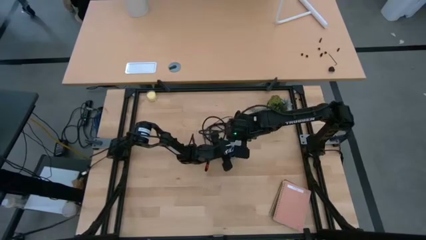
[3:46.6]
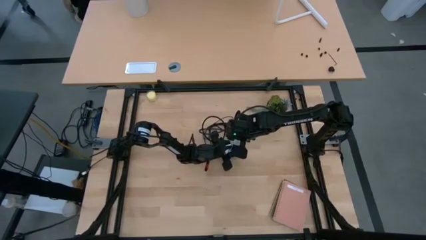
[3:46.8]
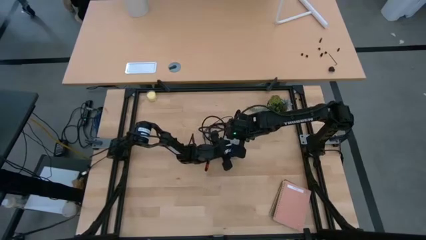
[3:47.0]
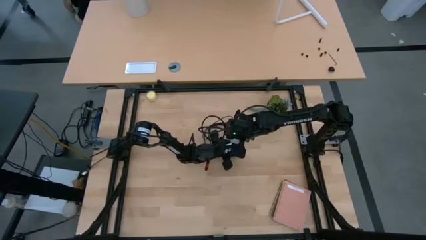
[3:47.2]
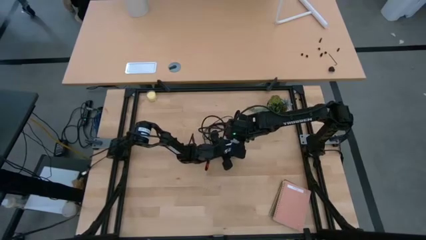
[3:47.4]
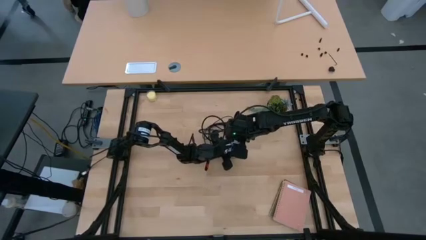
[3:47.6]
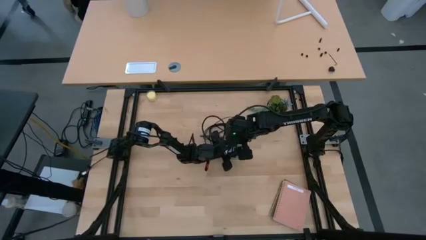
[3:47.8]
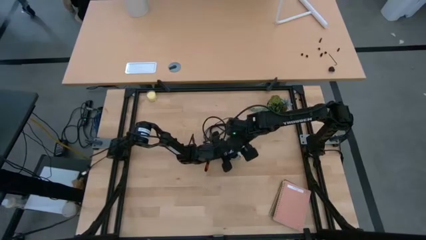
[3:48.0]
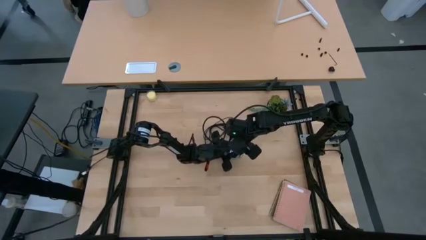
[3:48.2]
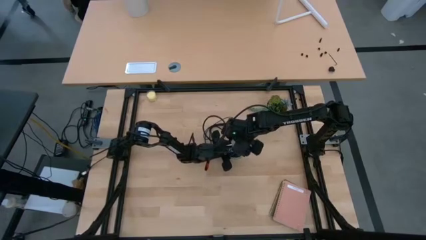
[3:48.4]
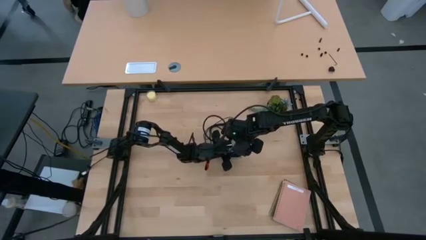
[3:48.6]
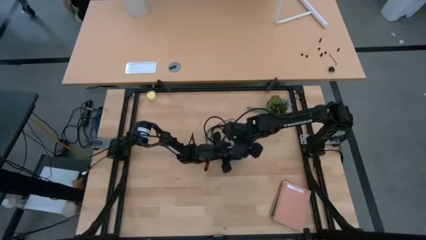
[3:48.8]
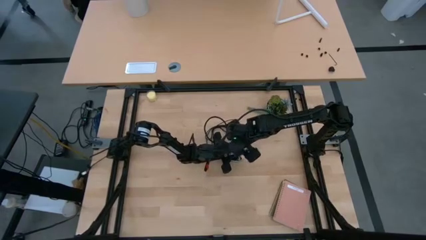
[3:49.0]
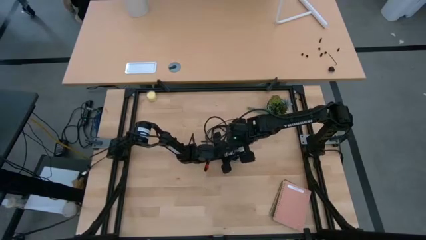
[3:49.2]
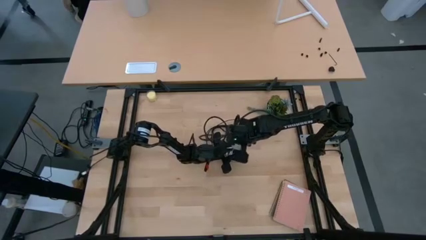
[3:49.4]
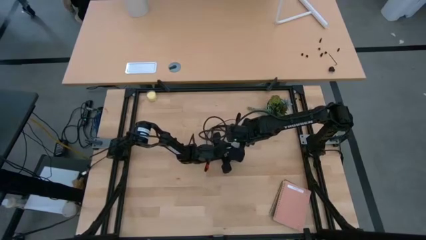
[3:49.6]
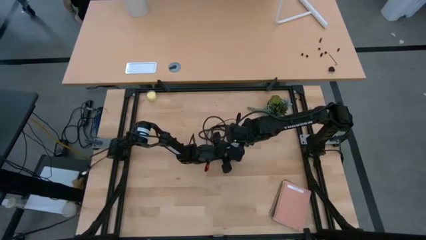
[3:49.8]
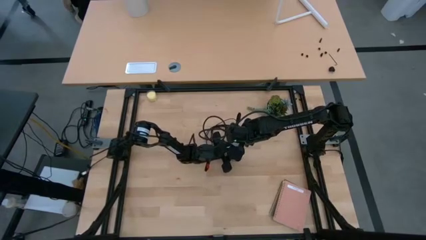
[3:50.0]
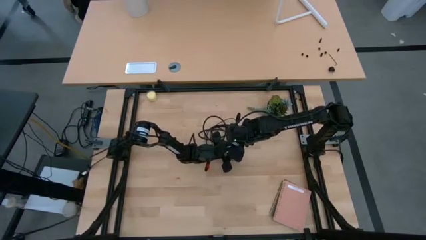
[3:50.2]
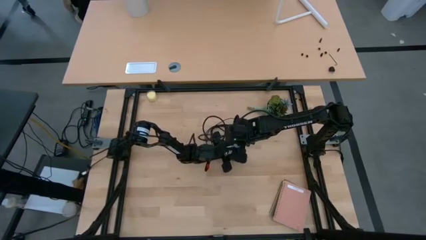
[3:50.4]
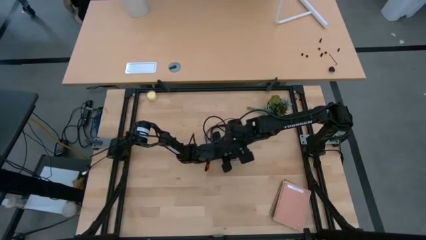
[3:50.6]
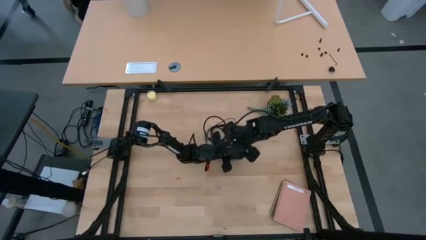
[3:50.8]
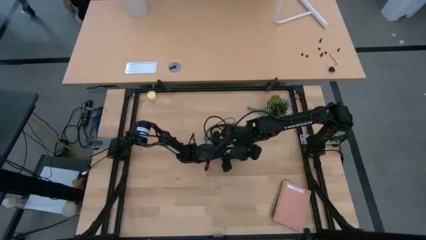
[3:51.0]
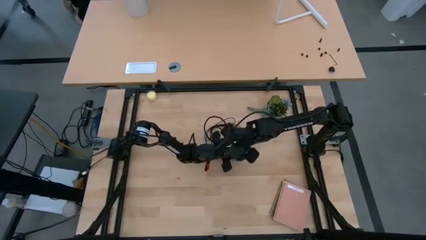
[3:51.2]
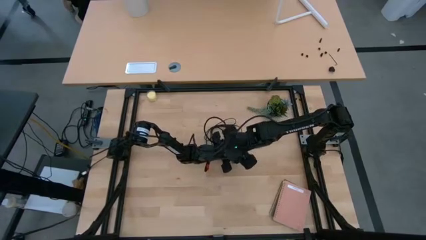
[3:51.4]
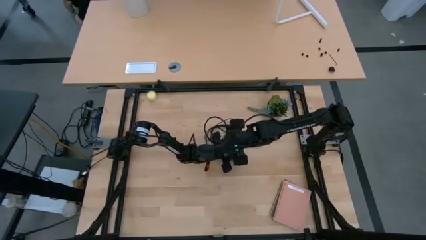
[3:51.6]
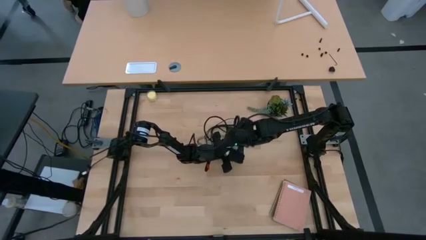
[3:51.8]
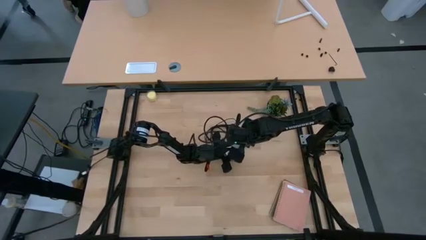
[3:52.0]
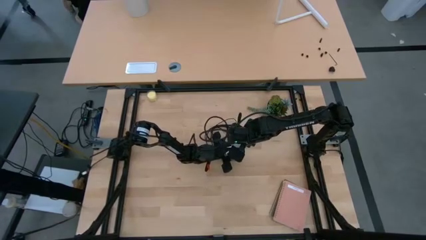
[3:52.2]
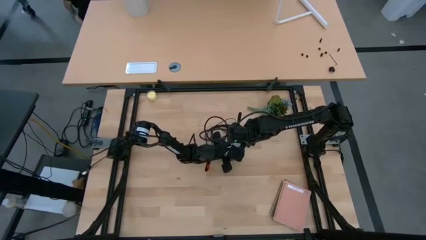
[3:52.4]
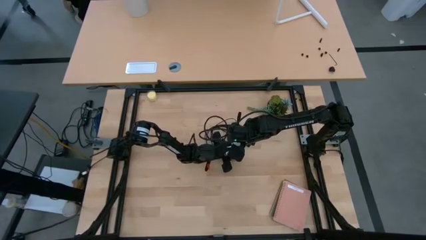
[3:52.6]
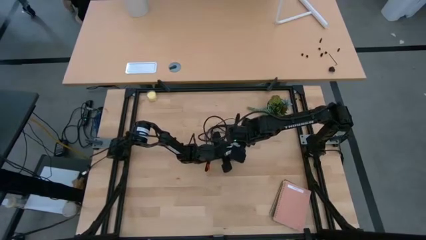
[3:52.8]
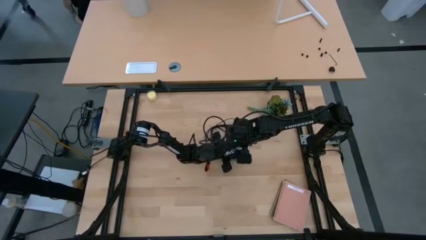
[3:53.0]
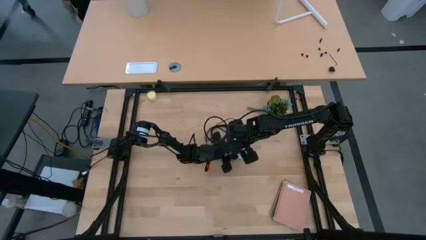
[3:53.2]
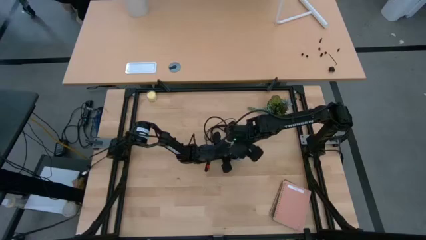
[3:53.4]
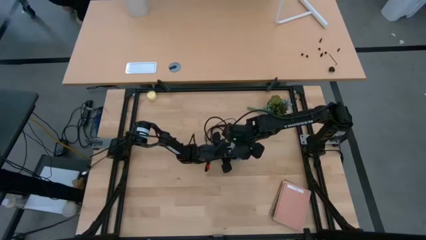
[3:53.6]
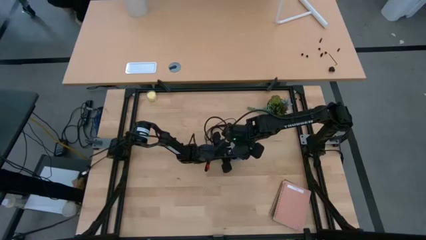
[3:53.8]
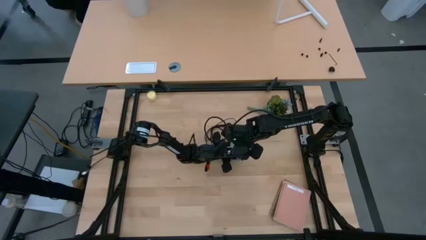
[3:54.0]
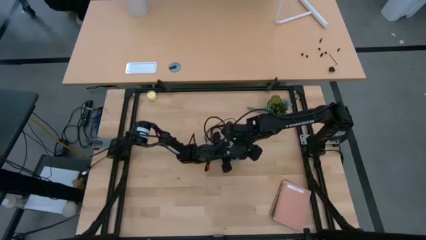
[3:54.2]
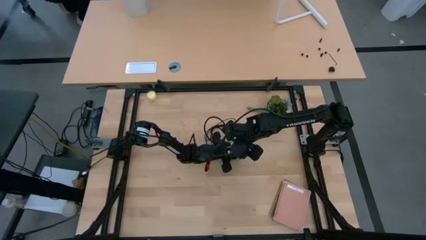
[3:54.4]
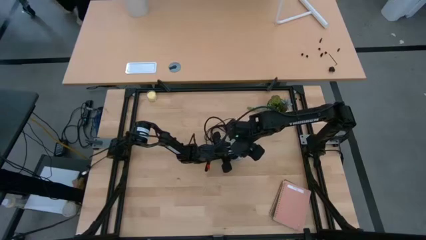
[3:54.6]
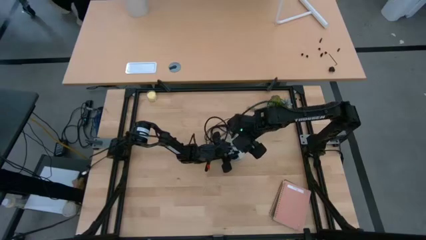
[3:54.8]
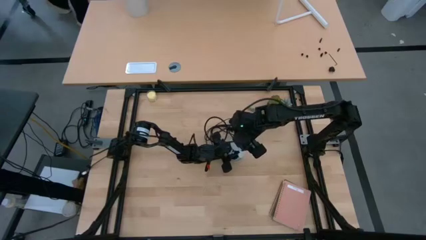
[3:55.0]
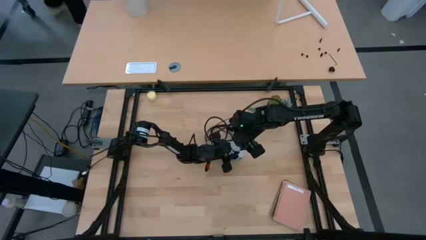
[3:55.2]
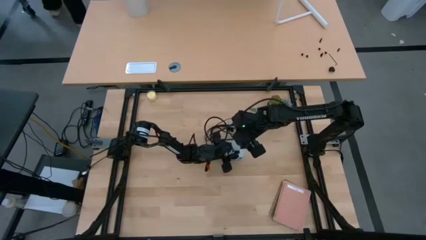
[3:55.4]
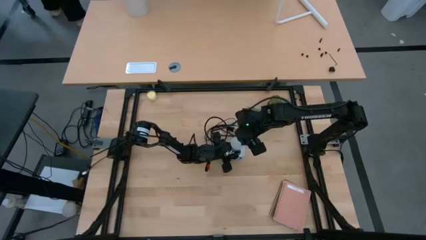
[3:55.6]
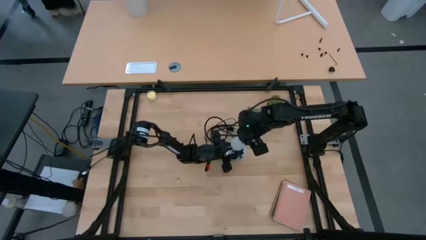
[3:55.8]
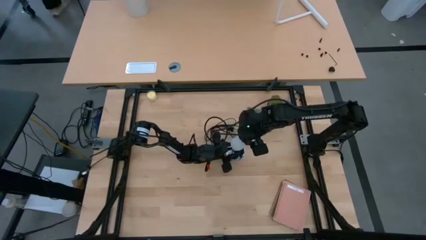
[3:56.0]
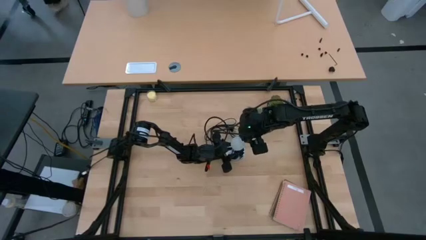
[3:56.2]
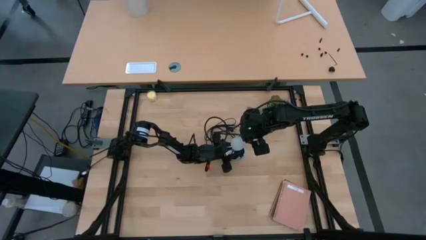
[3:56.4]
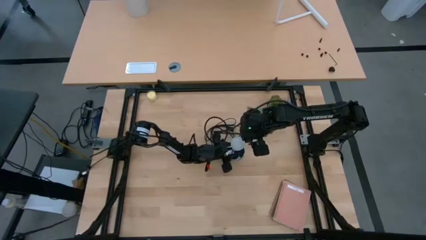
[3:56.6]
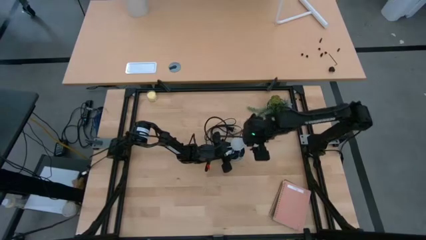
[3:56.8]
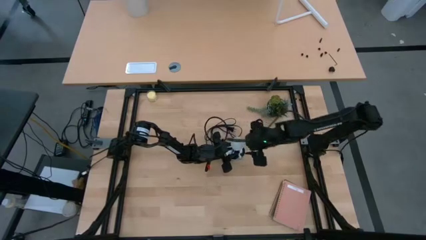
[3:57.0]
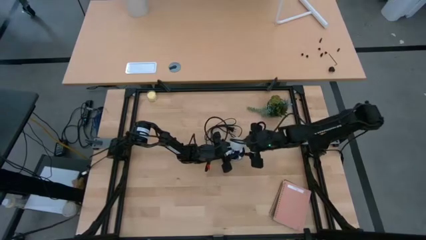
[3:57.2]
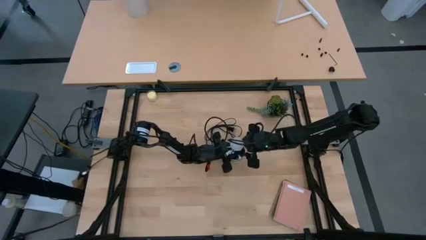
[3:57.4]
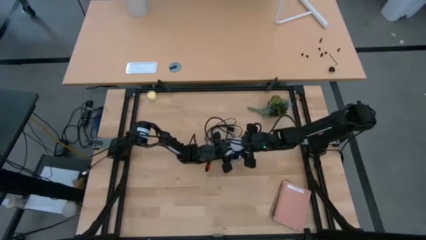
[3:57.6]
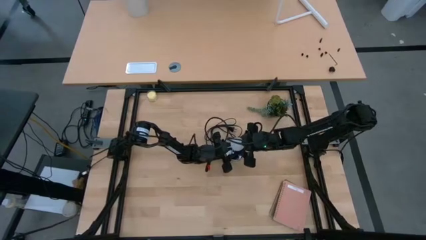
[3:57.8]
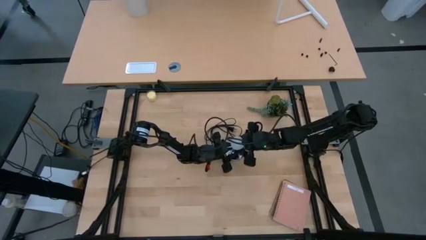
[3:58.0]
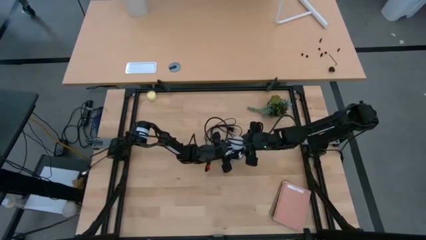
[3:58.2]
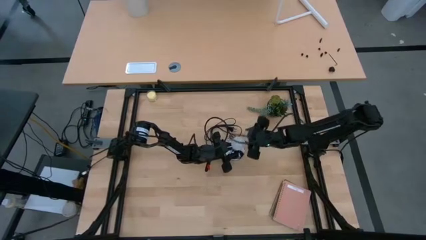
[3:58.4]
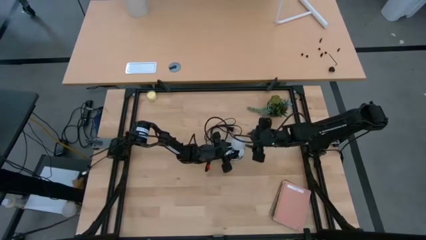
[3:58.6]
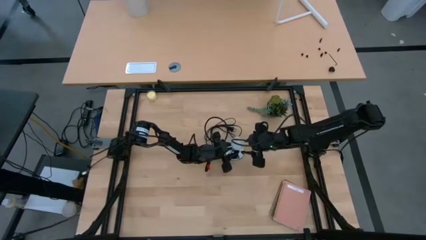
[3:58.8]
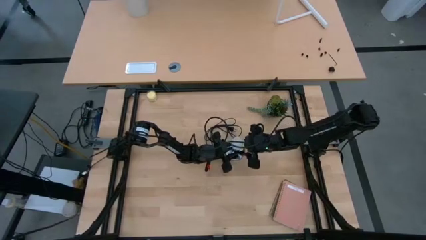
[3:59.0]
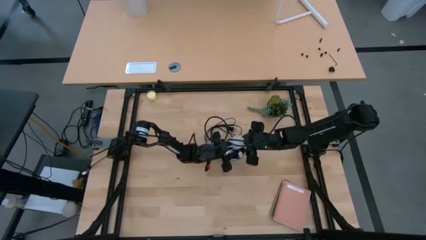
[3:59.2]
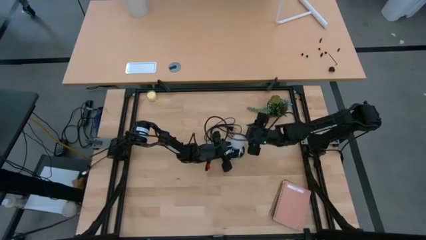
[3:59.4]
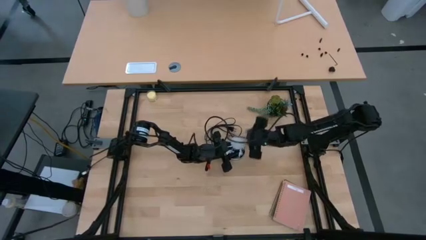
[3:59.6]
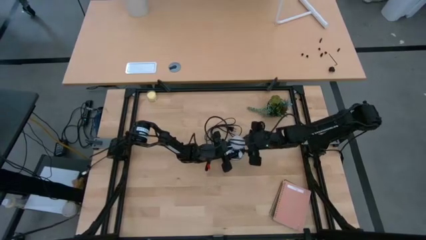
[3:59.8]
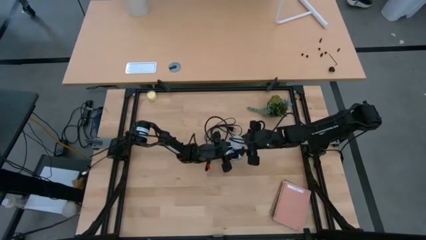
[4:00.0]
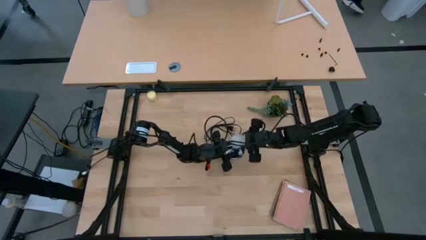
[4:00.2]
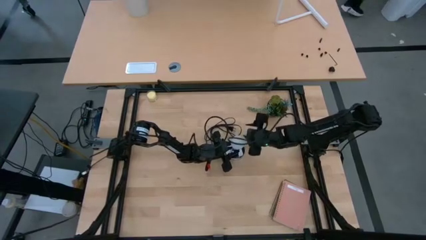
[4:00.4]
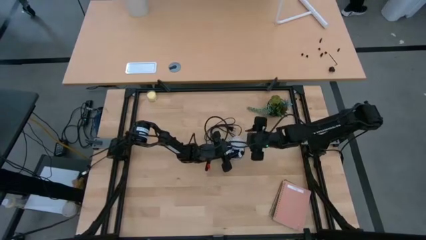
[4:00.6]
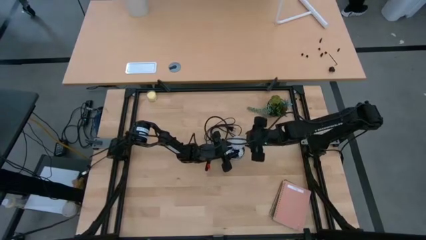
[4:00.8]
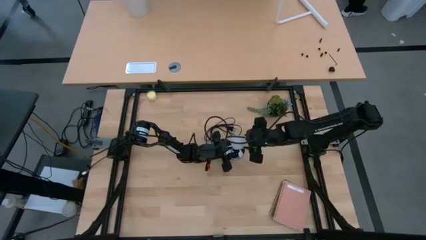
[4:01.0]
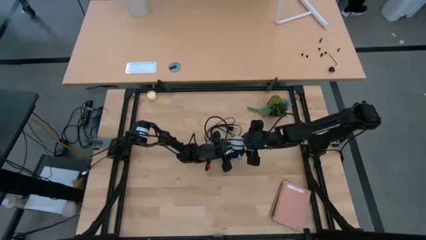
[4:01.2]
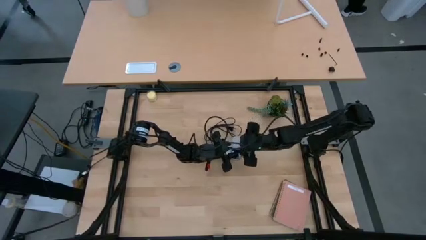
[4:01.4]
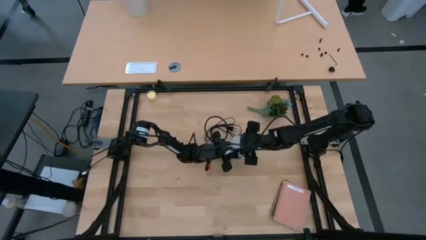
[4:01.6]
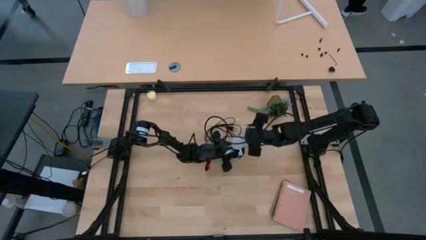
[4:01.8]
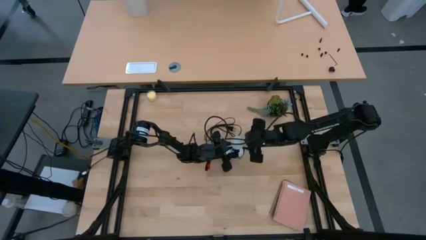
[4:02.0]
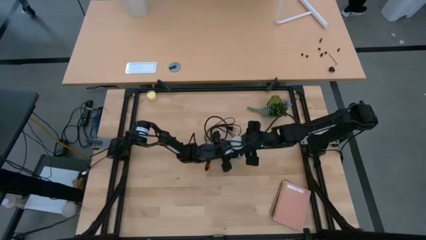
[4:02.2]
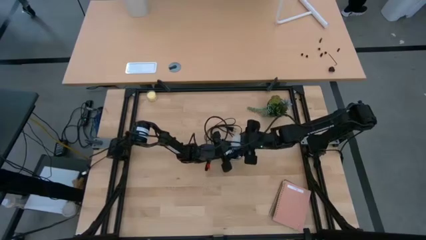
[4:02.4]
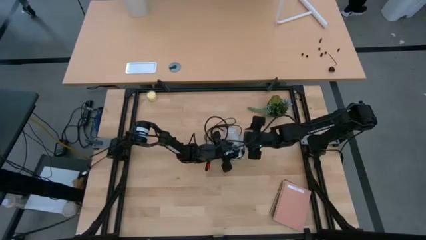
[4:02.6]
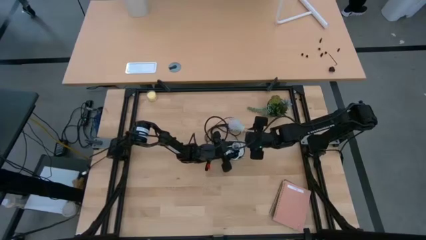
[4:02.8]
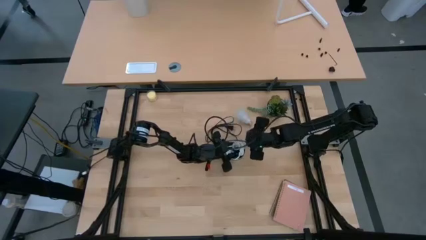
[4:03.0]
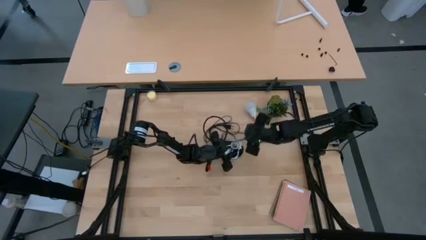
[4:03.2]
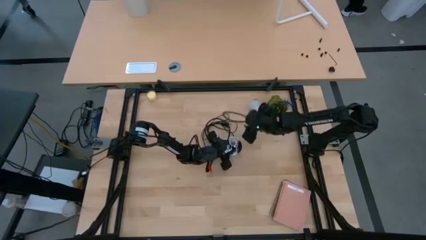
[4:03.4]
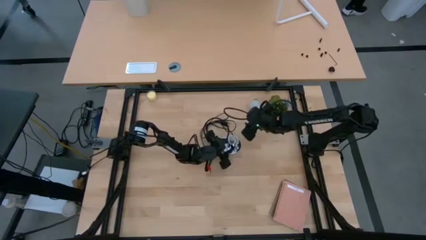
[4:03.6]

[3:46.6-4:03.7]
Task: Screw lightbulb
Remove the white lightbulb from the metallic lamp

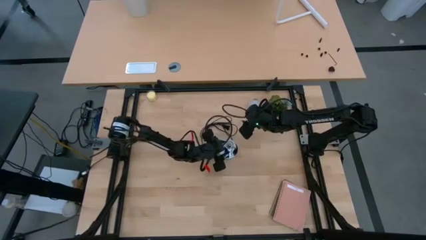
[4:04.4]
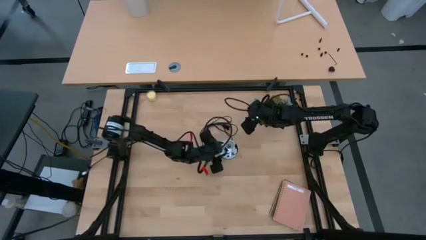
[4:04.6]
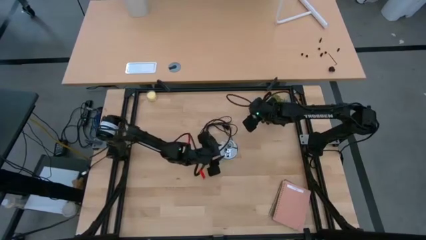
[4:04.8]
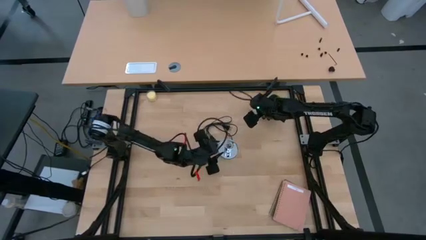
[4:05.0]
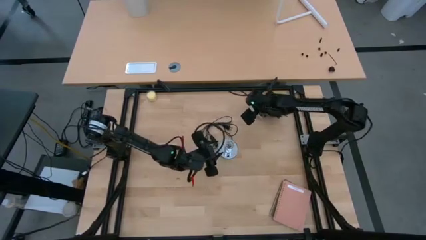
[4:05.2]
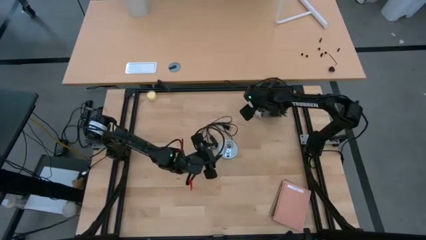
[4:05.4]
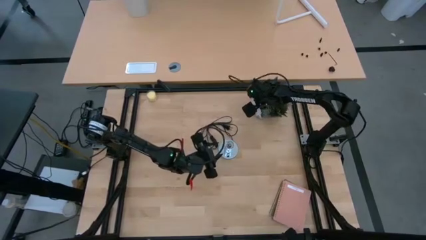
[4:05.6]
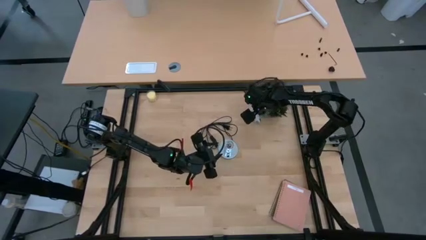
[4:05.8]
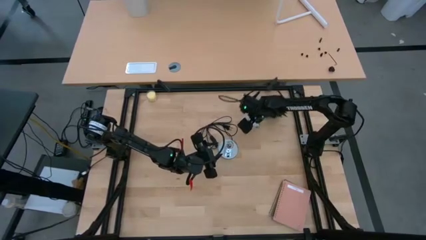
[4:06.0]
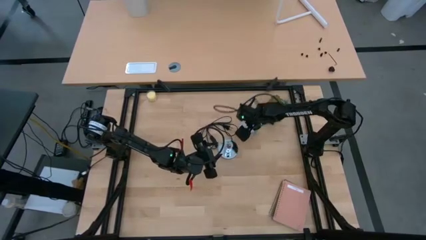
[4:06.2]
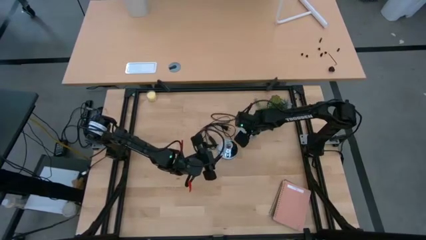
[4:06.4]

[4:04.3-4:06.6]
Move the white lightbulb slightly down the table next to the metallic lamp
